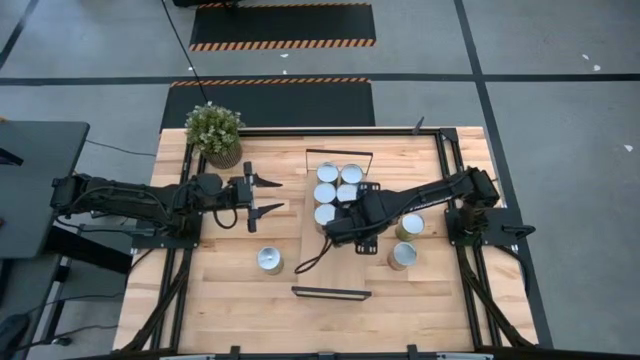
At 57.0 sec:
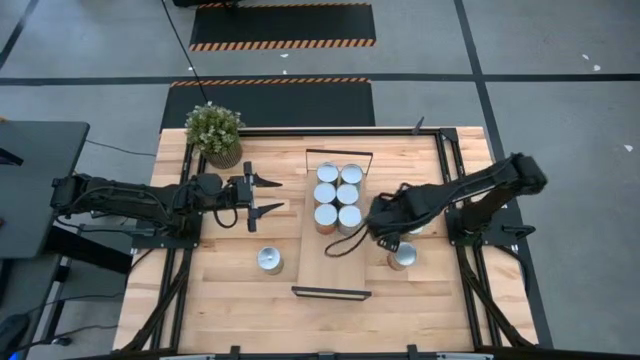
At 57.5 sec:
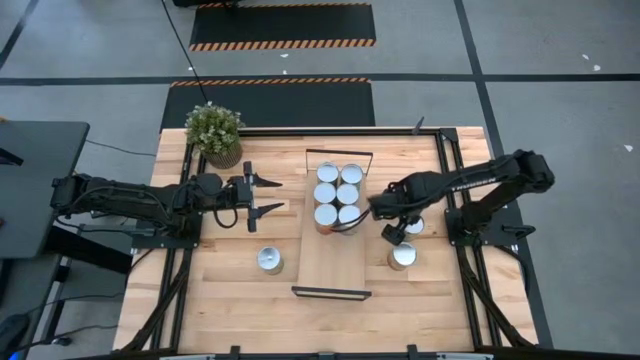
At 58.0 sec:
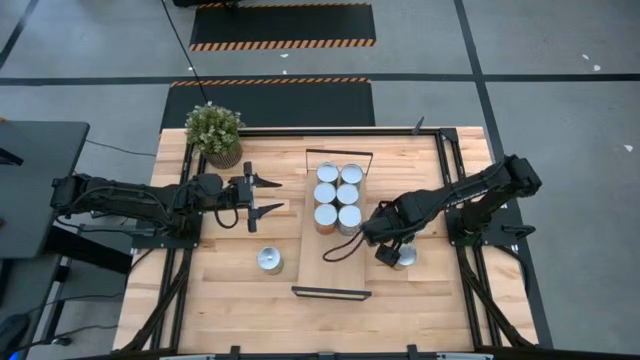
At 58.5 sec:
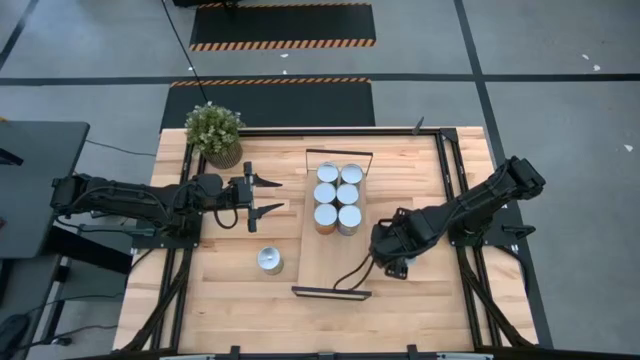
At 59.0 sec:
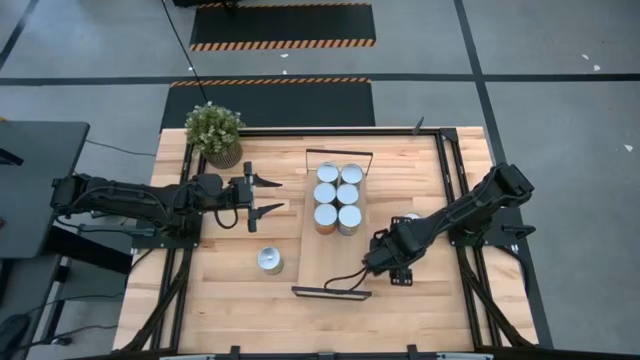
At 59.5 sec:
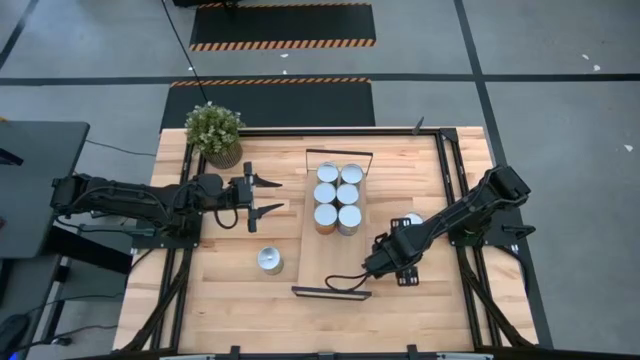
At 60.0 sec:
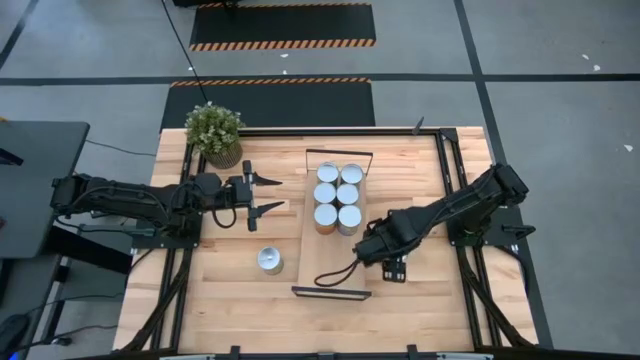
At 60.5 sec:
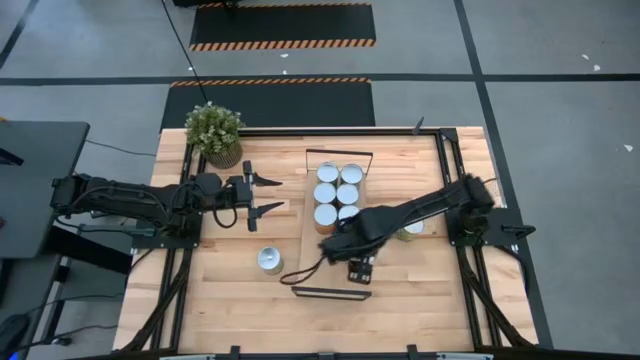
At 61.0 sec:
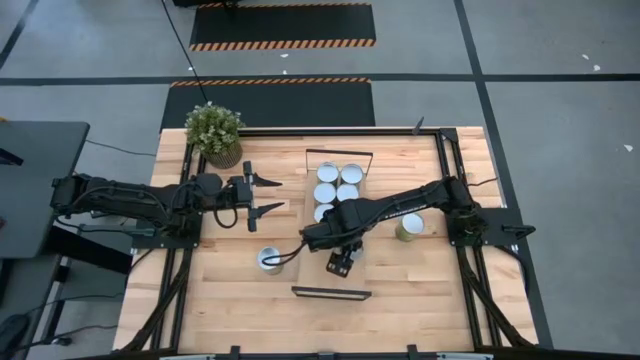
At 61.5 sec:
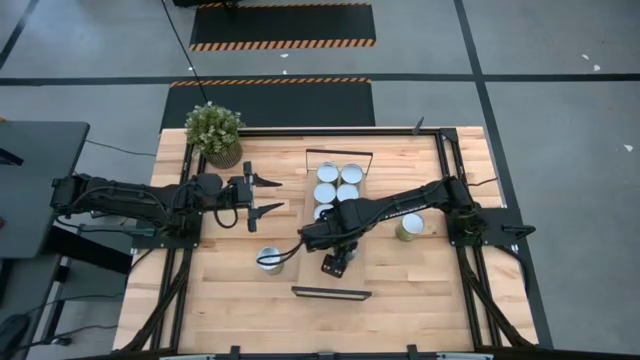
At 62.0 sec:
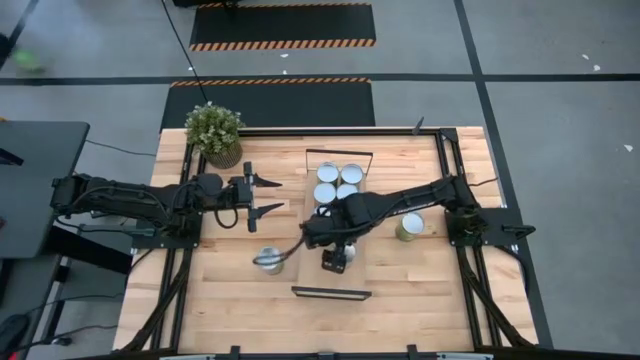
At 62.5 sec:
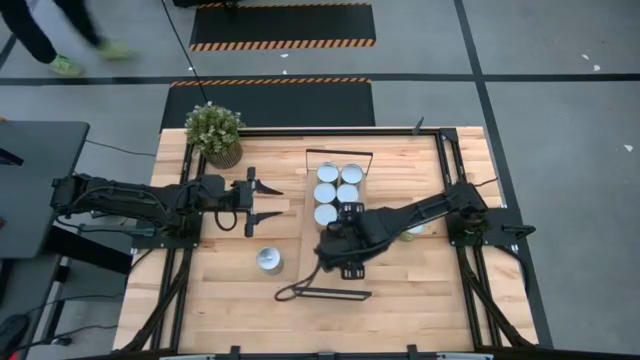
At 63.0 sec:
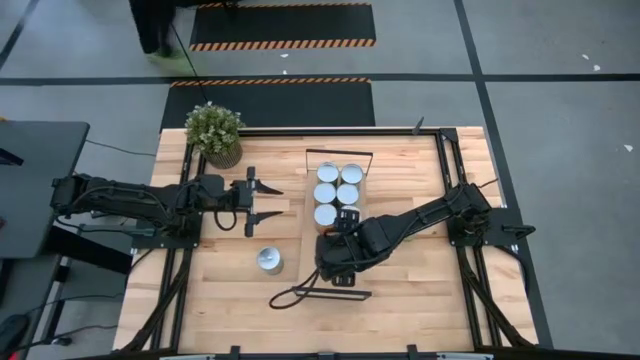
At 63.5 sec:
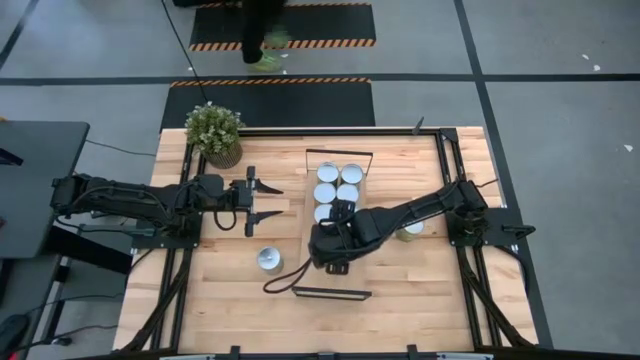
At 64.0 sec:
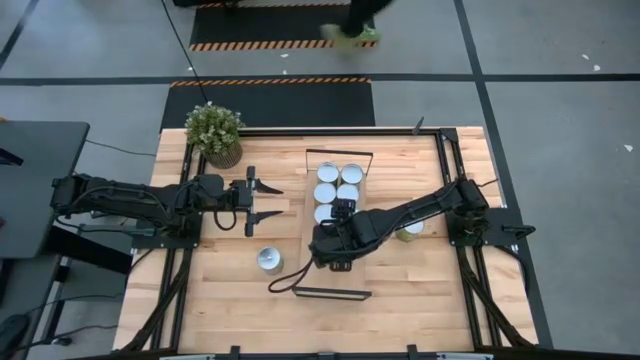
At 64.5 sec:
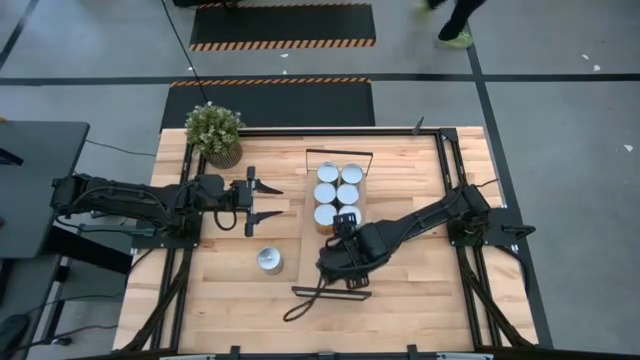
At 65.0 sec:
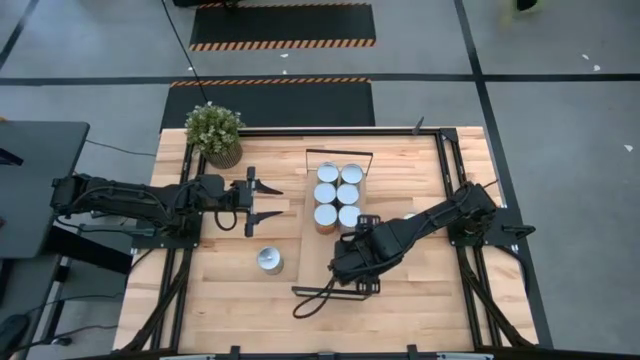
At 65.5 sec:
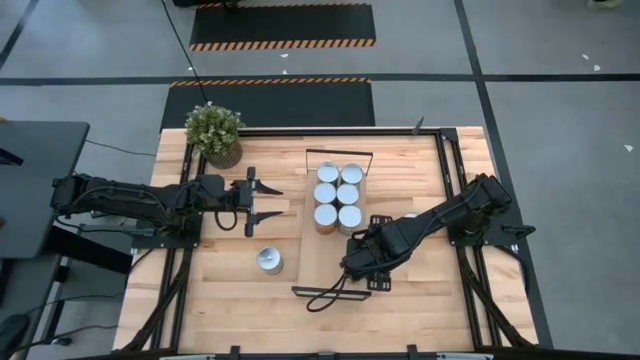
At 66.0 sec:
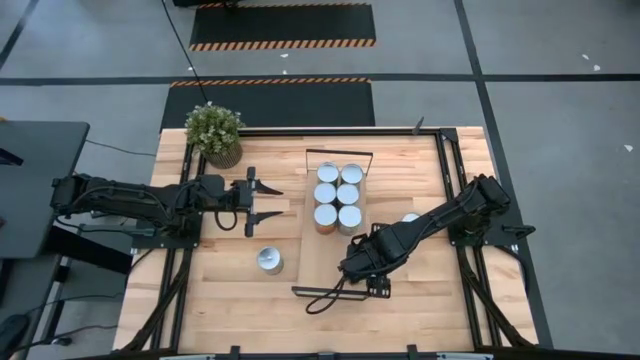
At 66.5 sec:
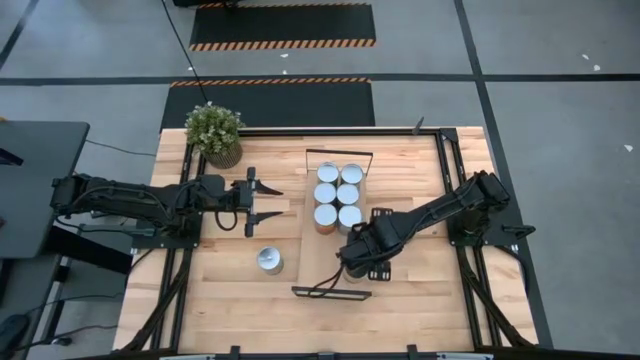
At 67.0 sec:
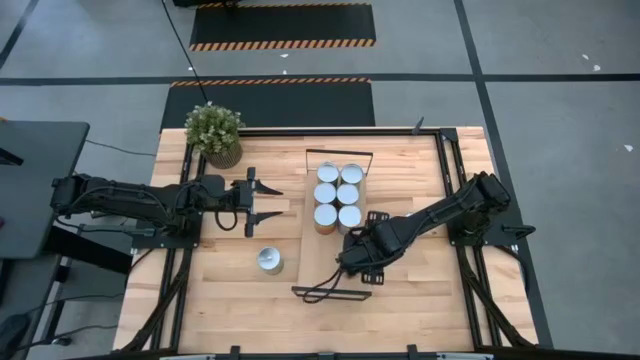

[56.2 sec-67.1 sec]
Task: Pick and place cans onto a shelf
Put the canned corn on the shelf

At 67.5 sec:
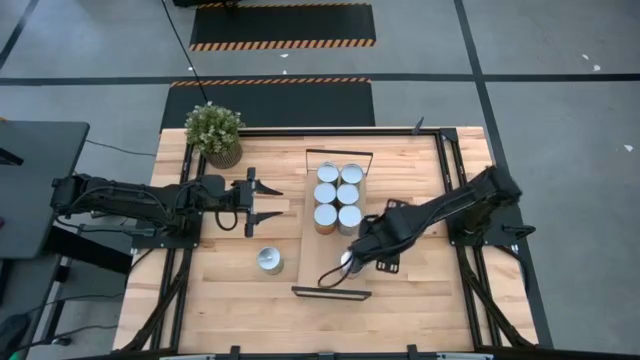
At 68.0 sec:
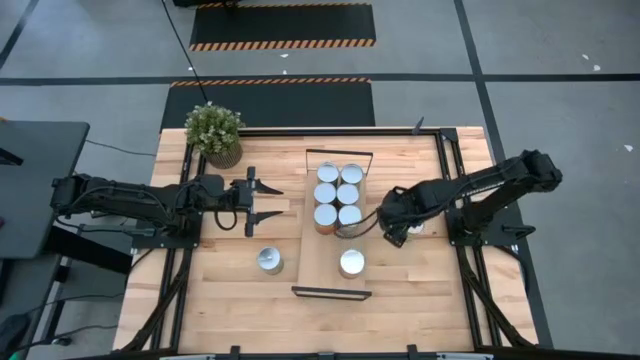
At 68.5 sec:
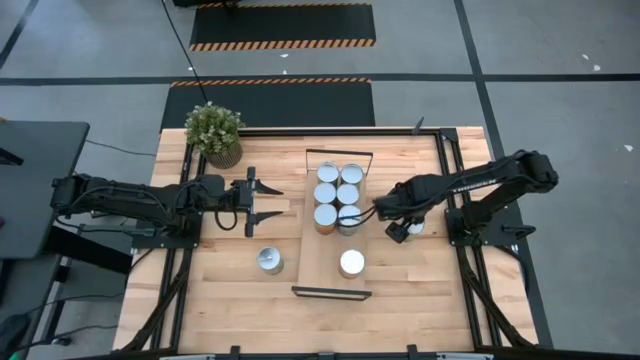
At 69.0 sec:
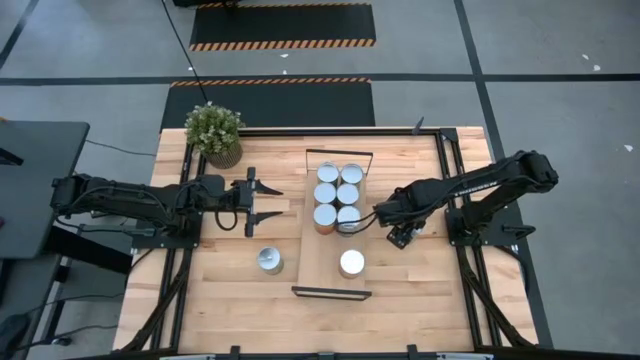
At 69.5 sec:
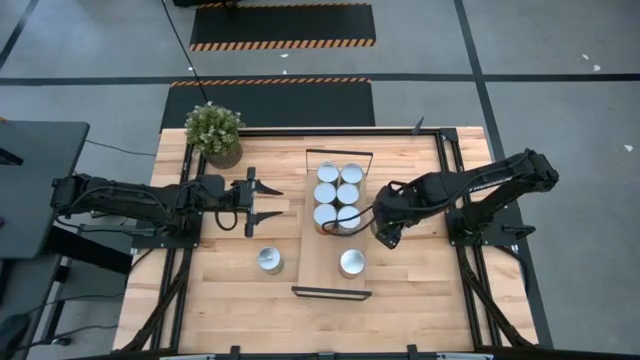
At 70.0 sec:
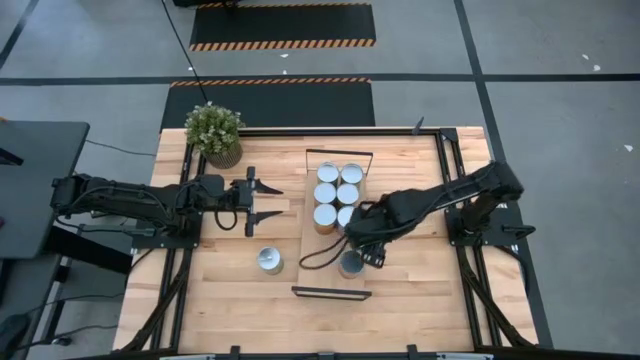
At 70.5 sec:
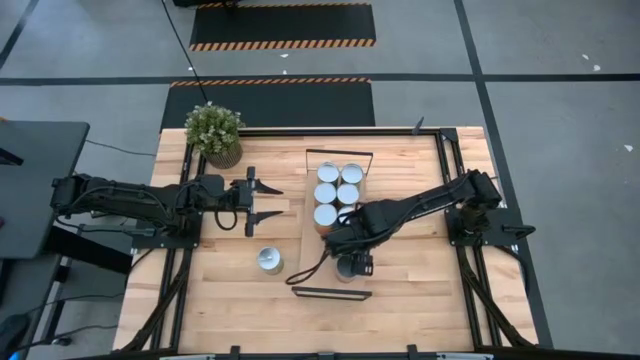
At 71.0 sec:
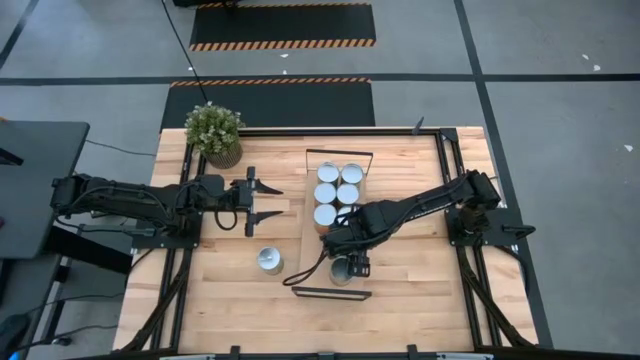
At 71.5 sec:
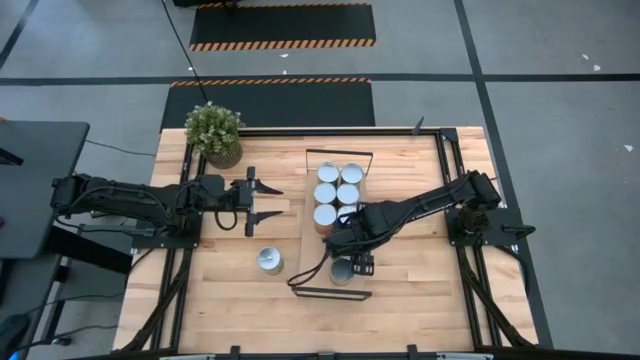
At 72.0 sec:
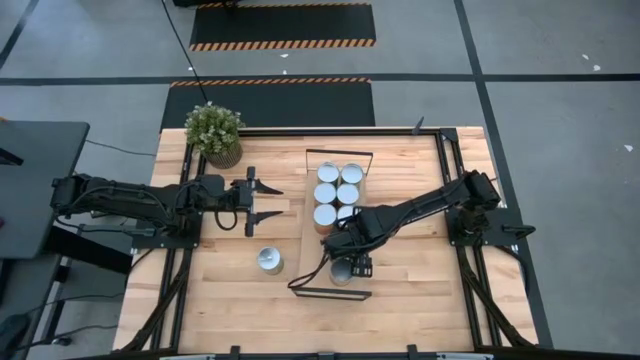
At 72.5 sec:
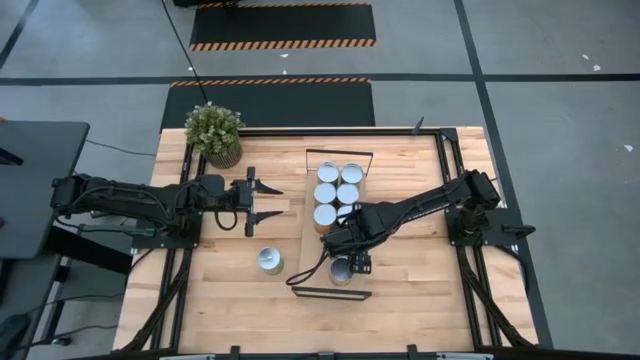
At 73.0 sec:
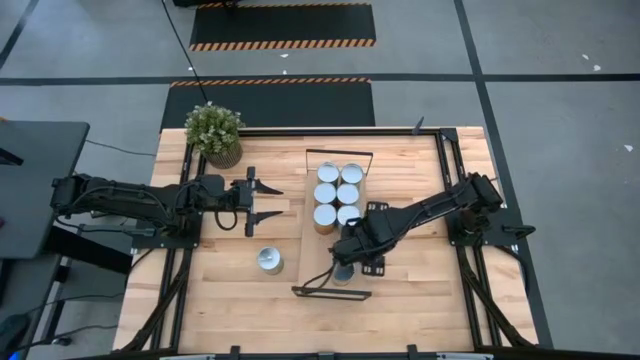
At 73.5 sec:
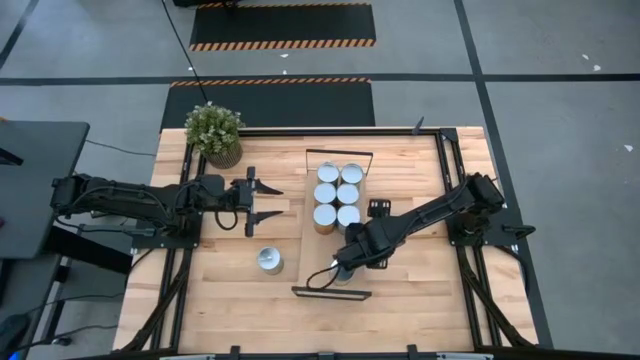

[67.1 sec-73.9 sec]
Put the canned pears on the shelf

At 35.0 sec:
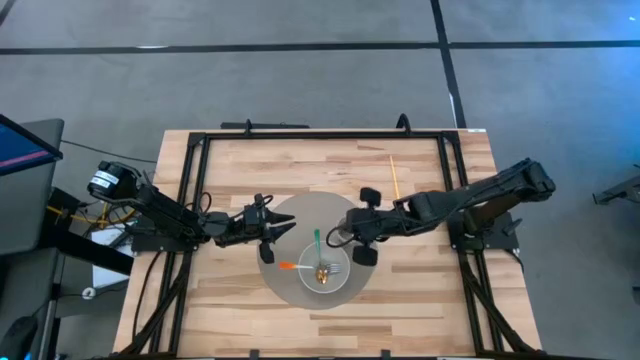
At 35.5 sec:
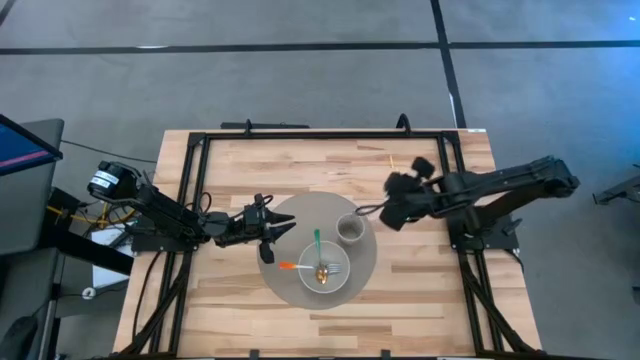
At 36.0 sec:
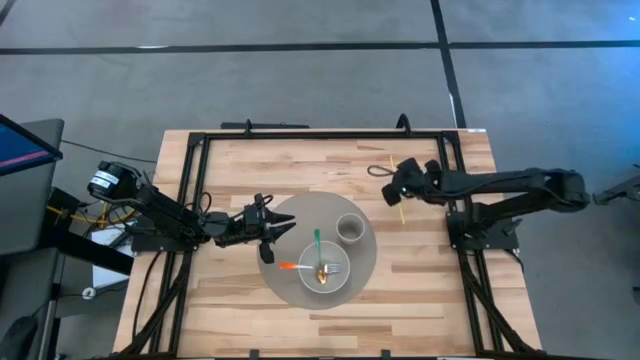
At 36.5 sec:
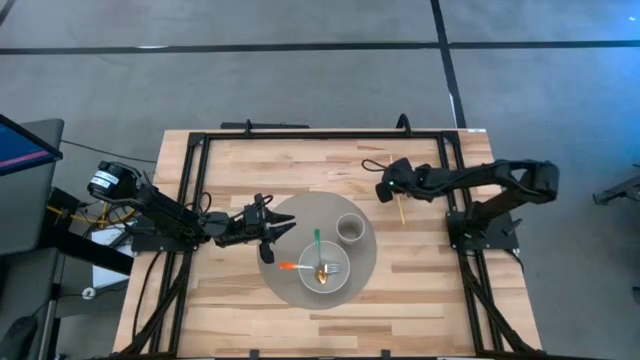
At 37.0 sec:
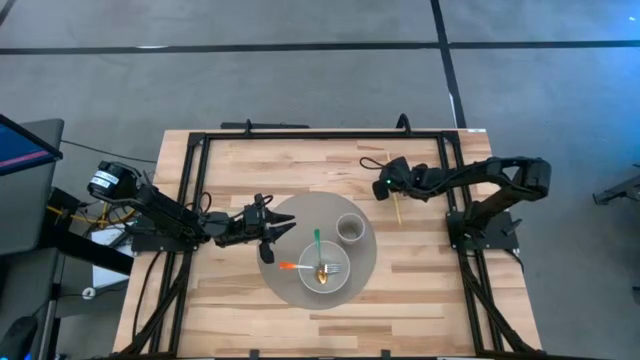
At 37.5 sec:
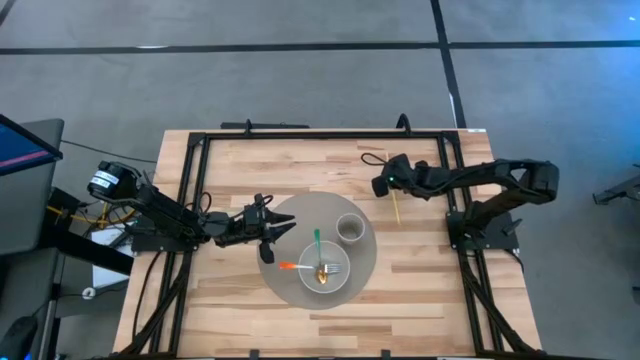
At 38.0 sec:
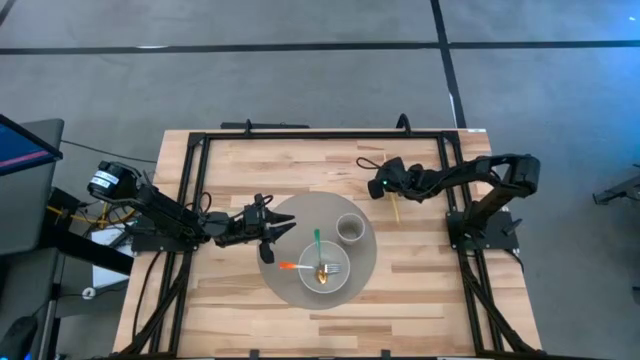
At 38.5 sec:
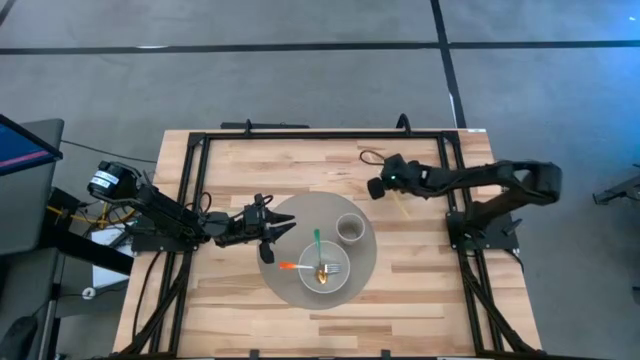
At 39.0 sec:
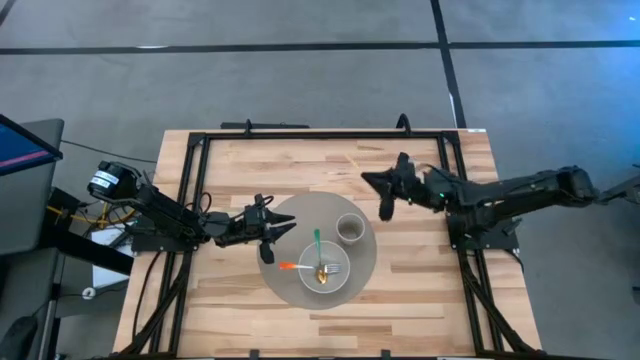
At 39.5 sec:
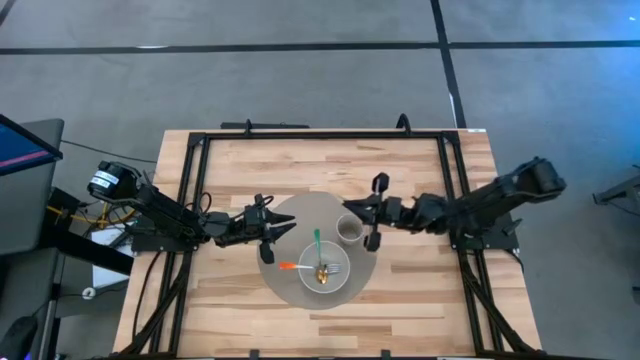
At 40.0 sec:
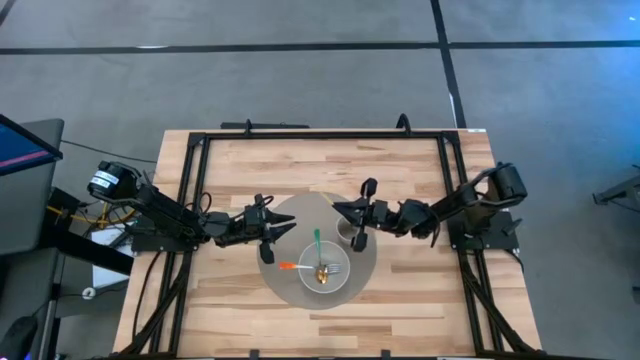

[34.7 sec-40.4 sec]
Task: Pick & Place Utensil
Put the yellow straw into the gray cup
